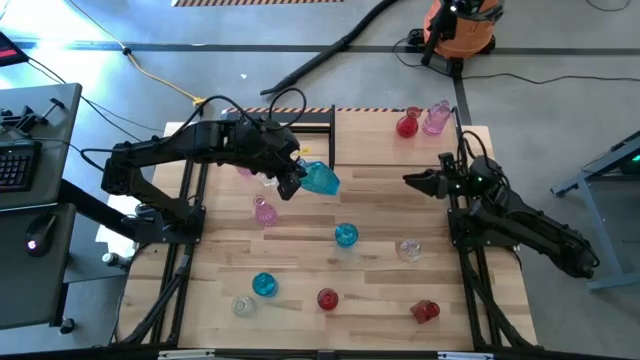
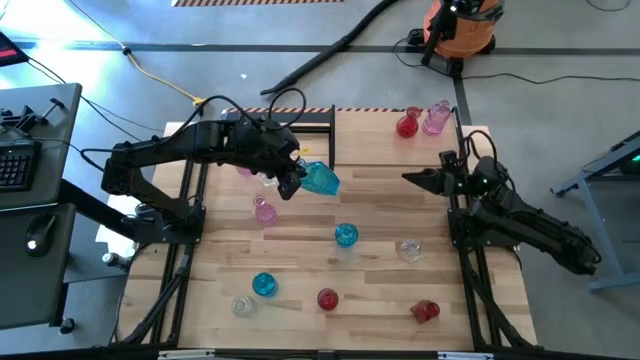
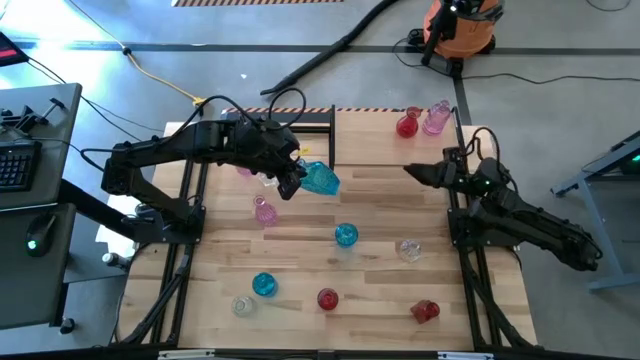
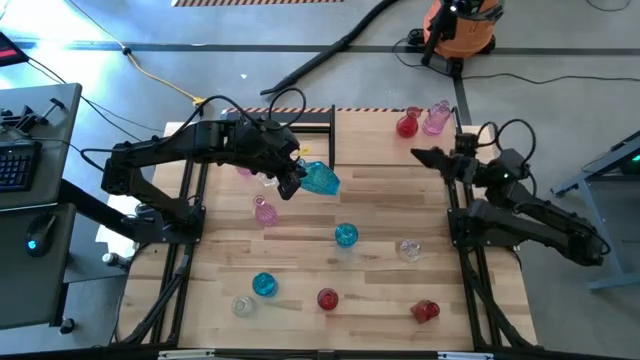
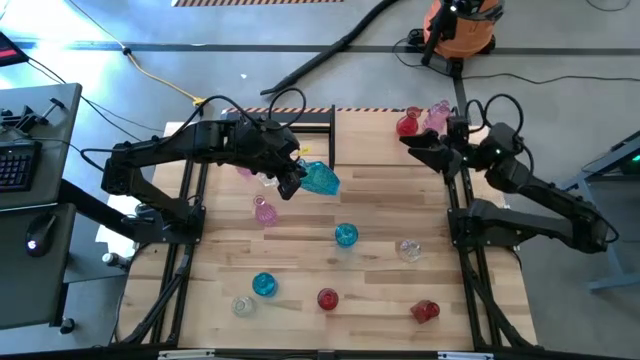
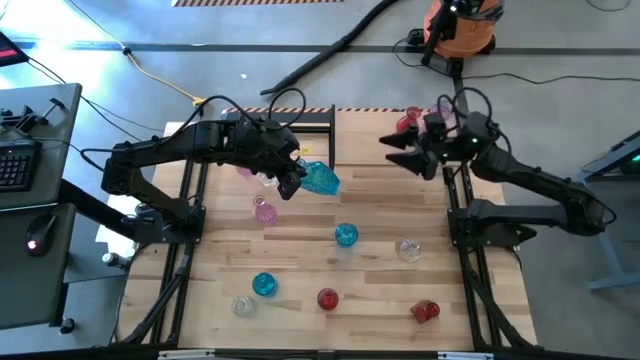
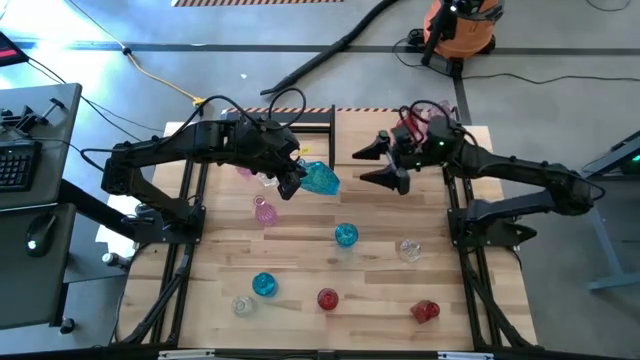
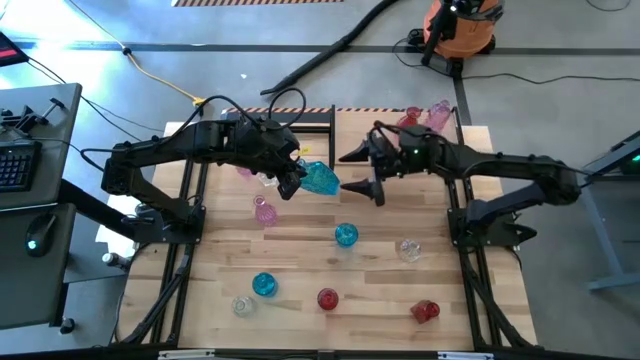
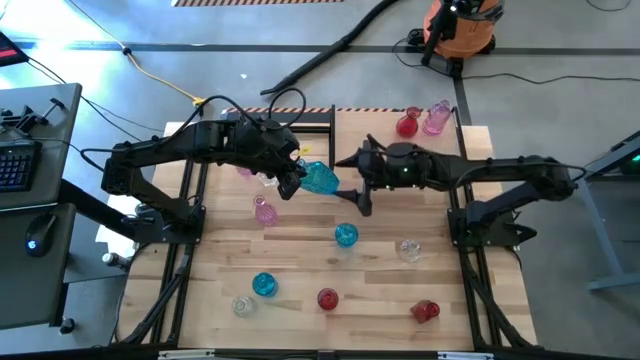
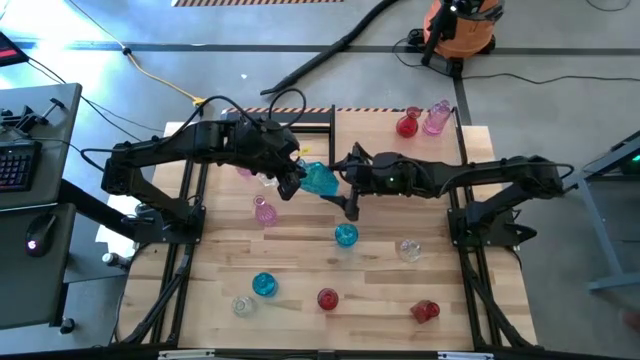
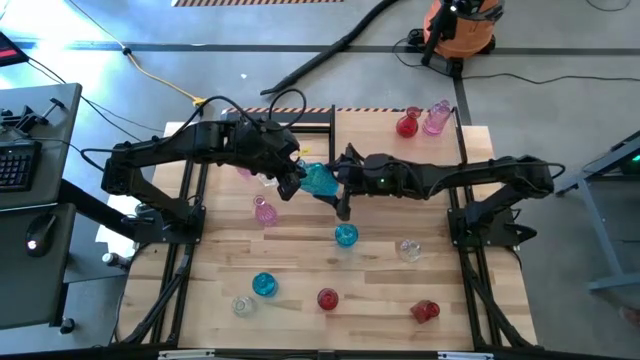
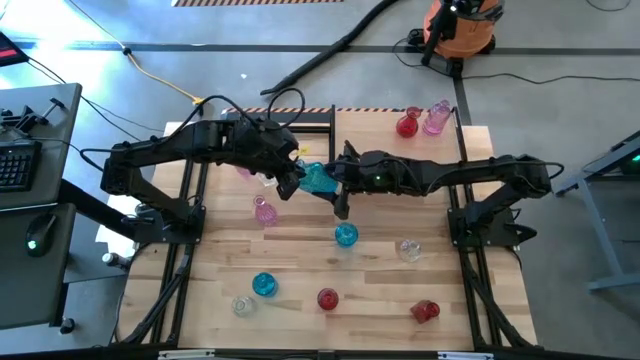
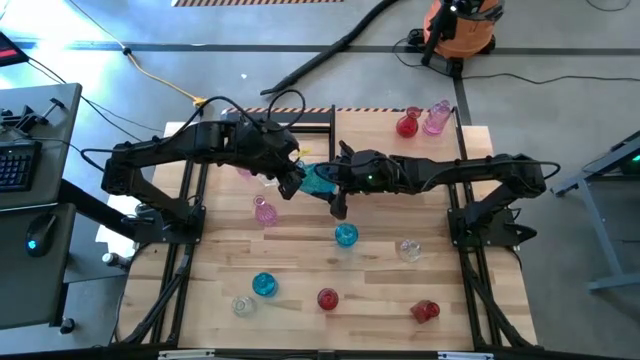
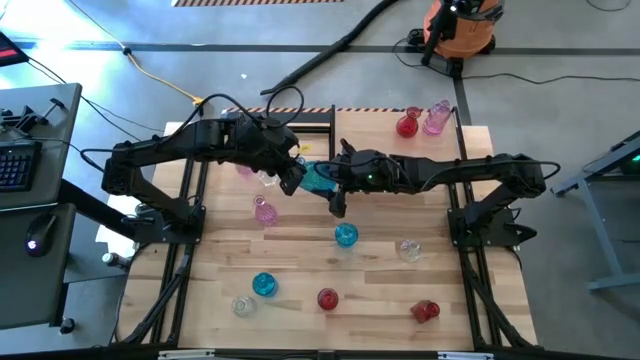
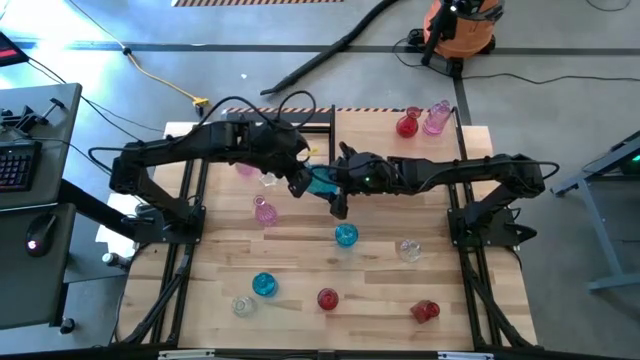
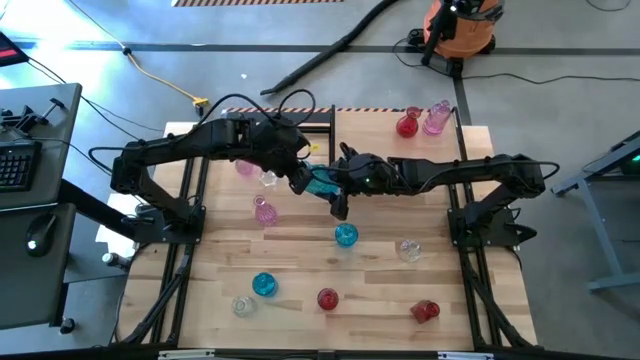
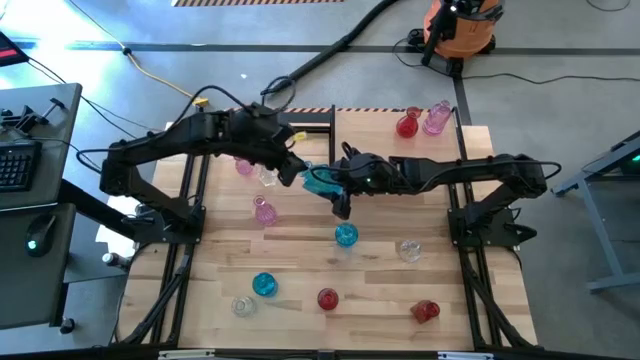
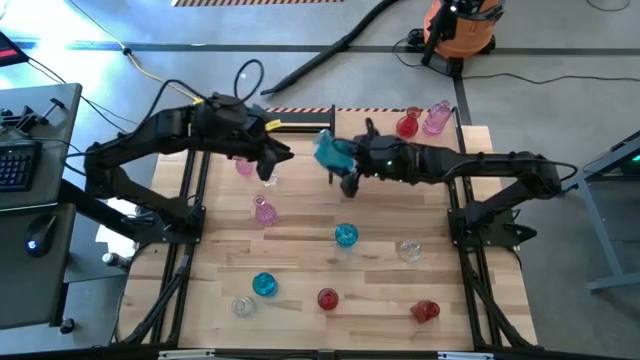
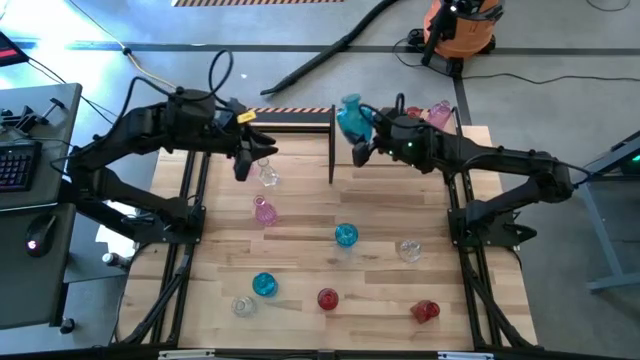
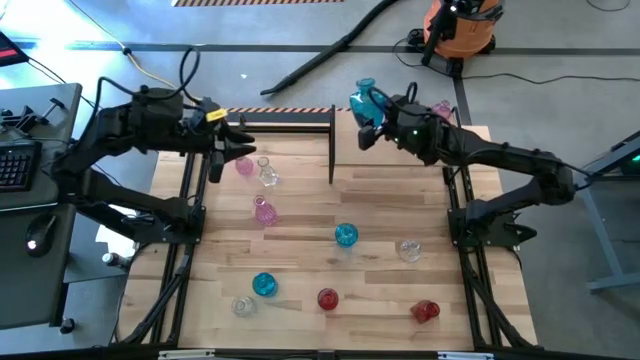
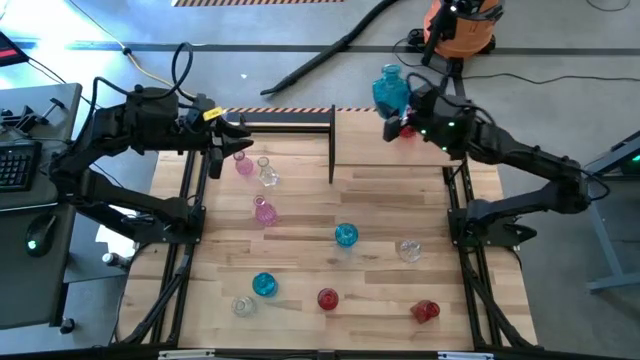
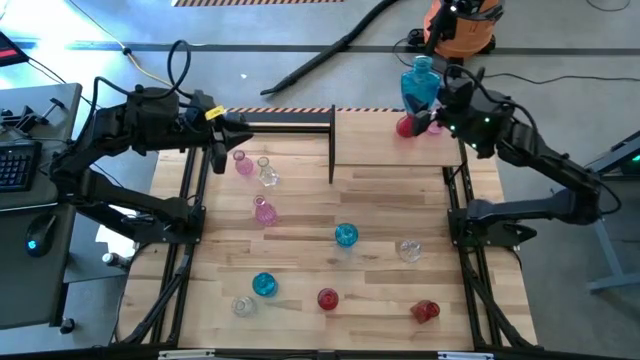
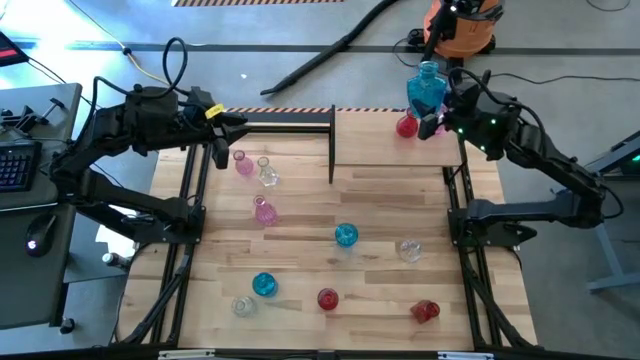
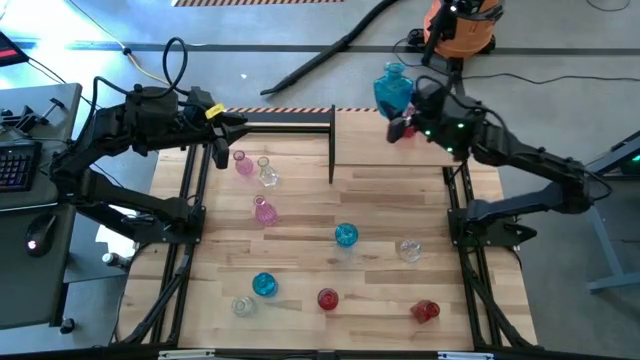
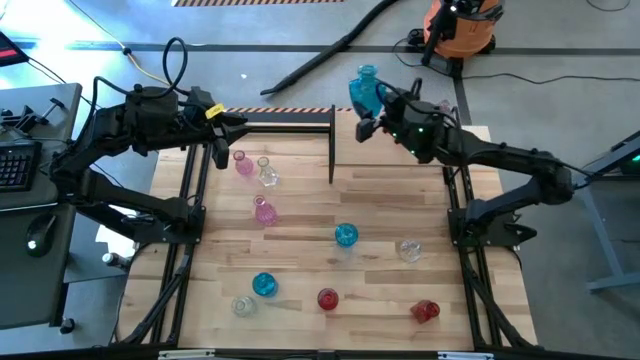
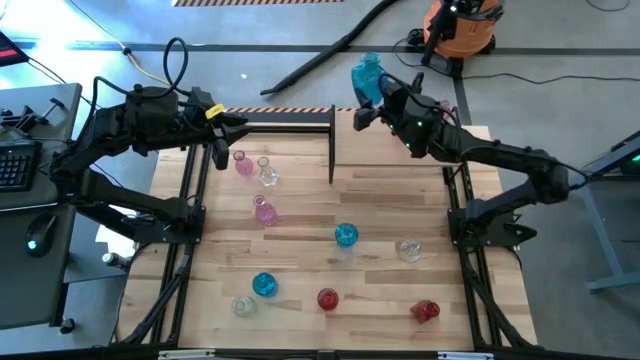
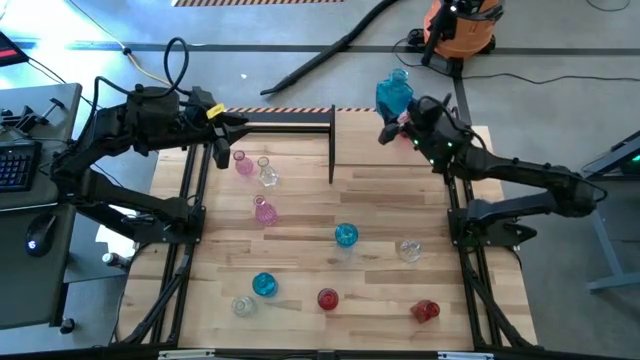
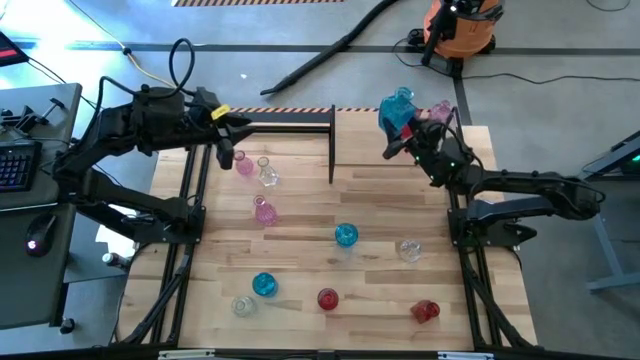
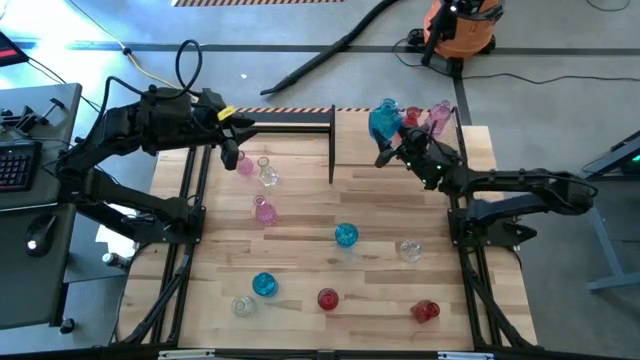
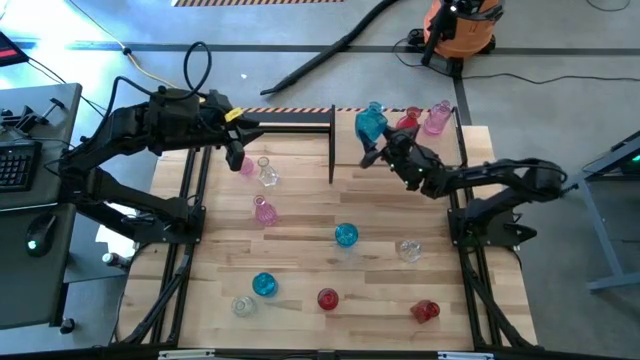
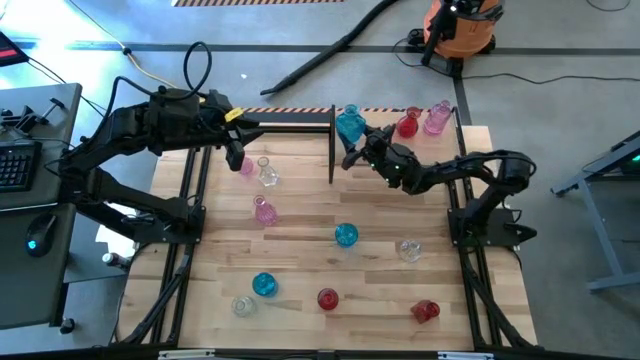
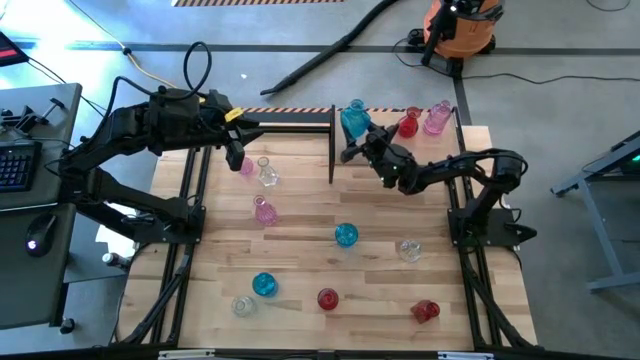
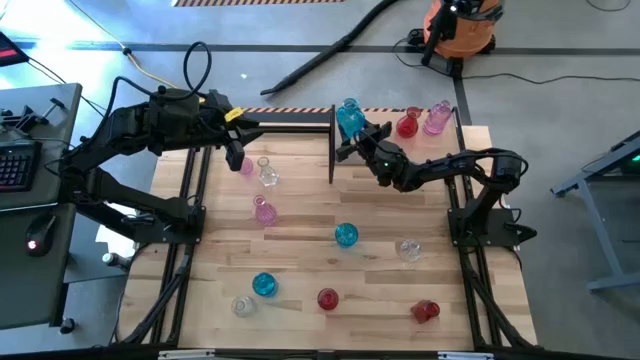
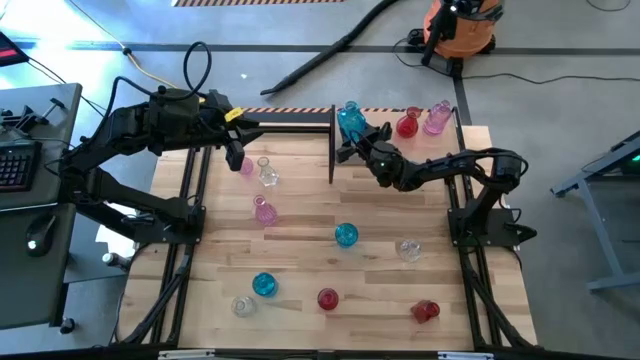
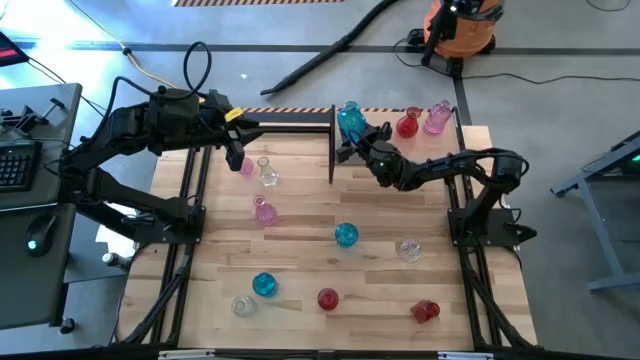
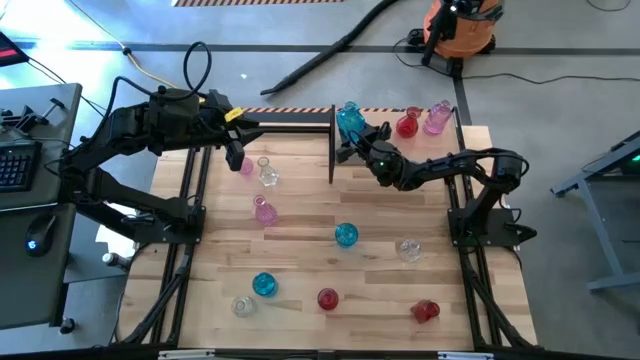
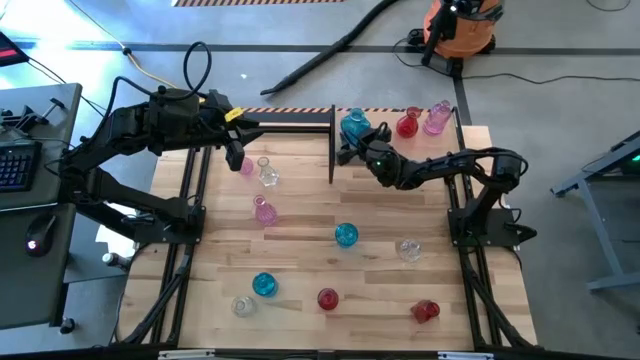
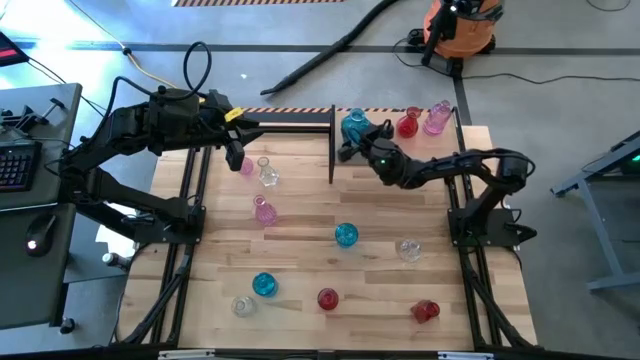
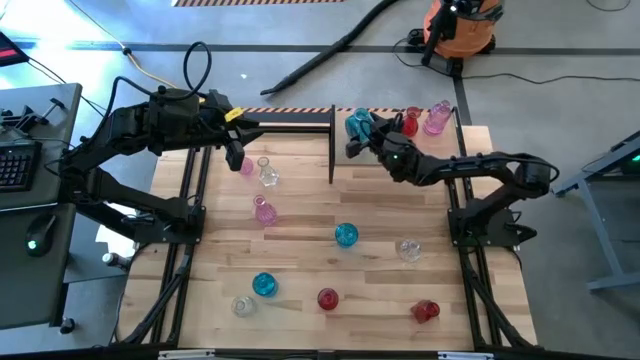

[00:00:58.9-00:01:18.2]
Task: sort vases onto shelf
Put the top left blue vase on the shelf

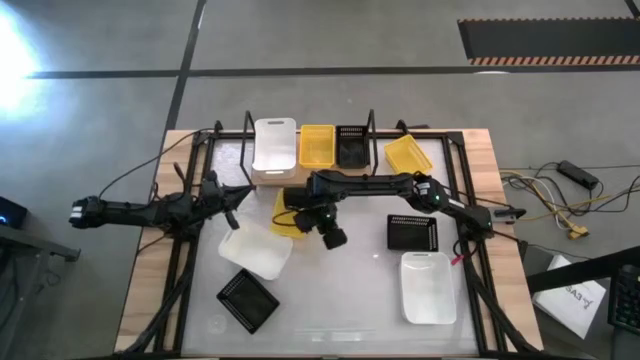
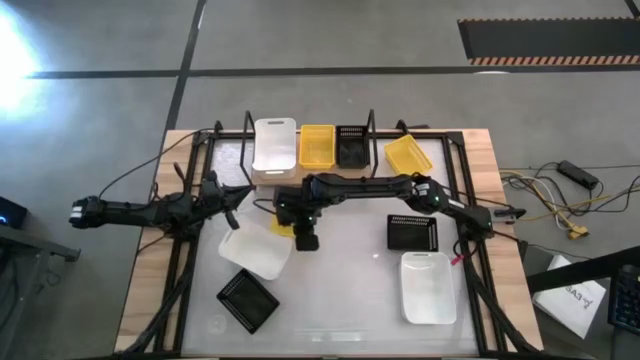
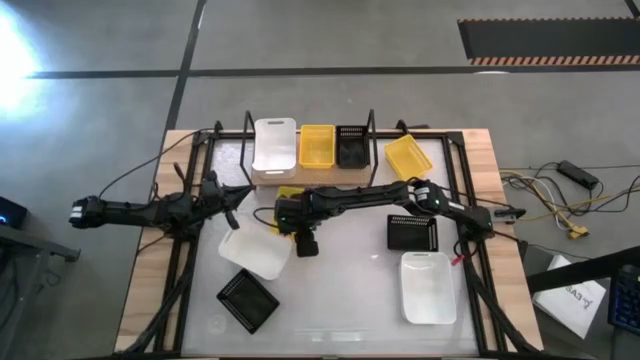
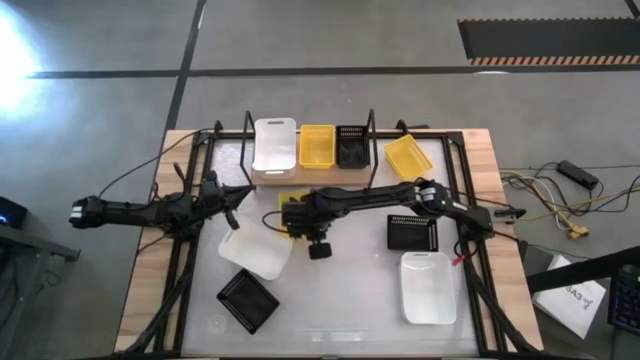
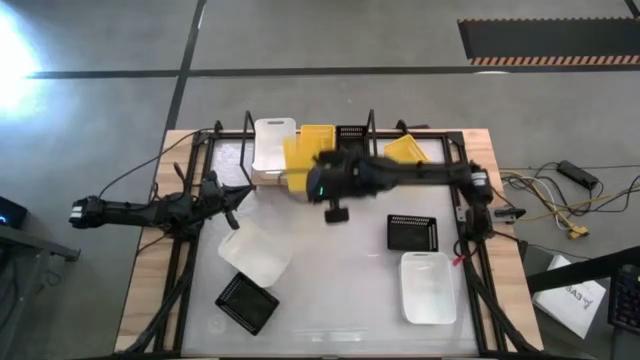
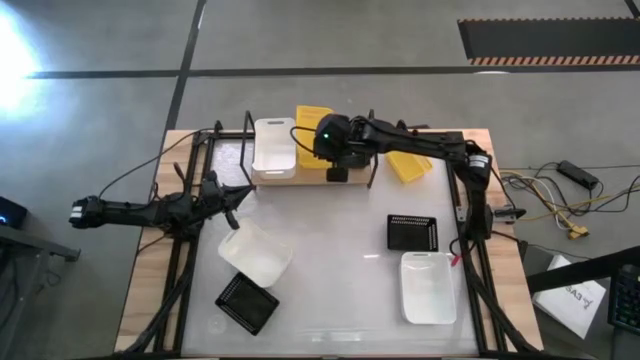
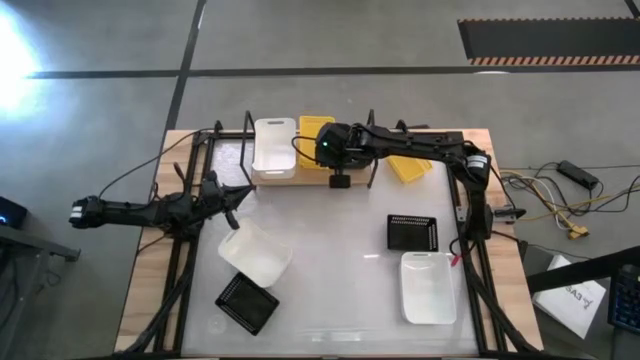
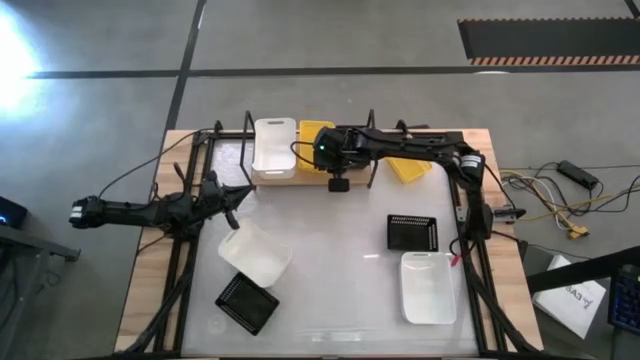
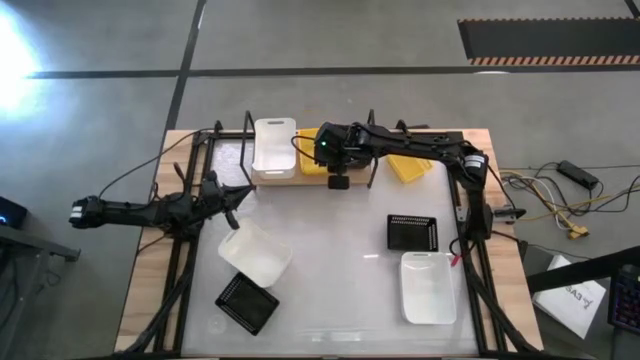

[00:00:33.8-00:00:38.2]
Task: Stack baskets on shelf by color
Stack the bottom yellow bin on top of the yellow bin on the shelf
